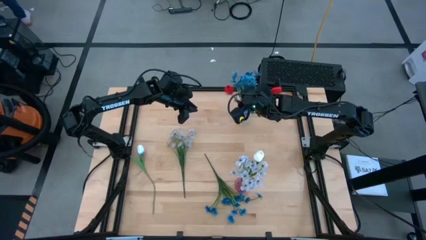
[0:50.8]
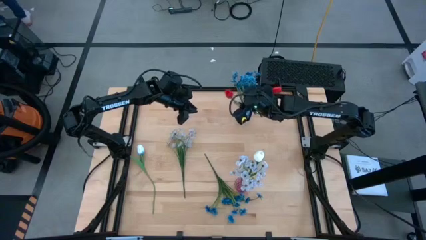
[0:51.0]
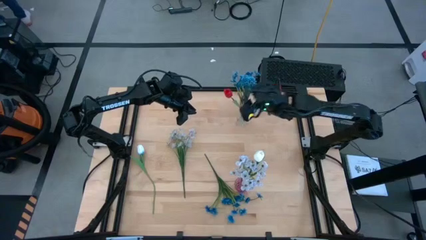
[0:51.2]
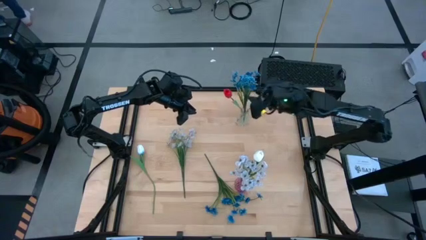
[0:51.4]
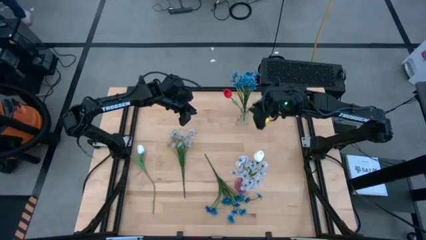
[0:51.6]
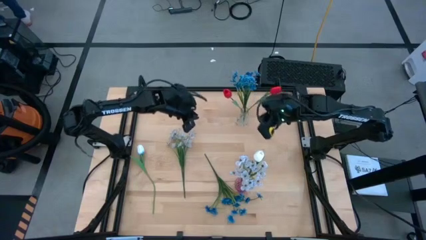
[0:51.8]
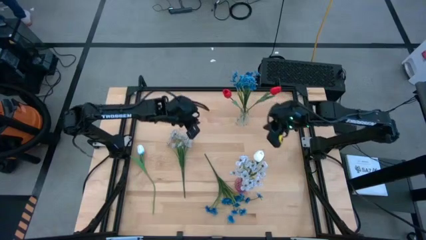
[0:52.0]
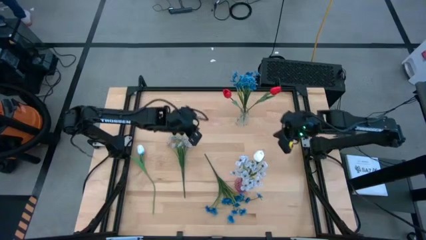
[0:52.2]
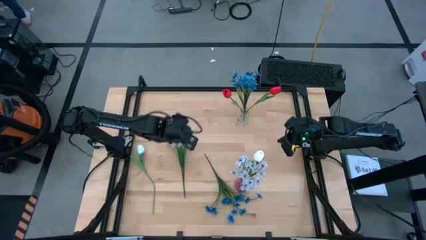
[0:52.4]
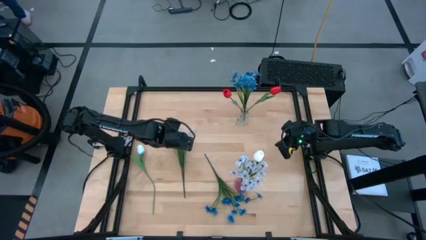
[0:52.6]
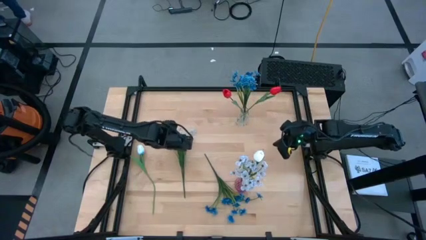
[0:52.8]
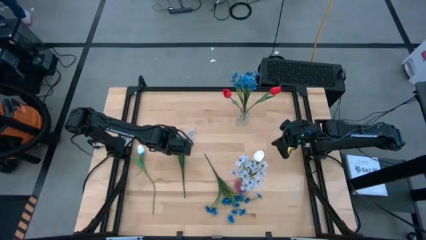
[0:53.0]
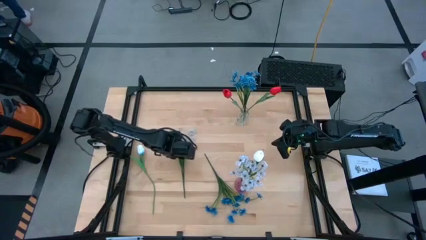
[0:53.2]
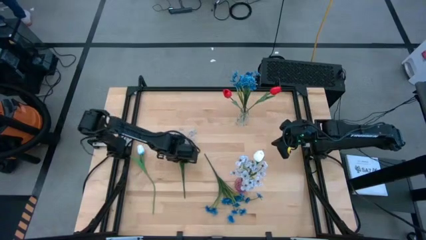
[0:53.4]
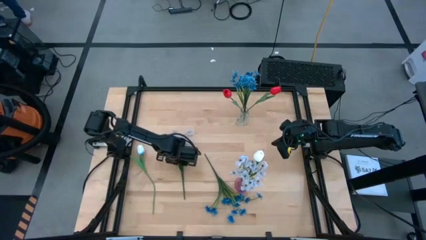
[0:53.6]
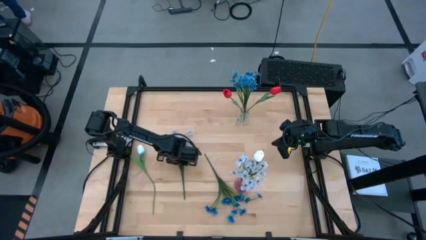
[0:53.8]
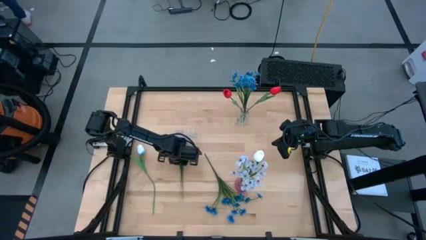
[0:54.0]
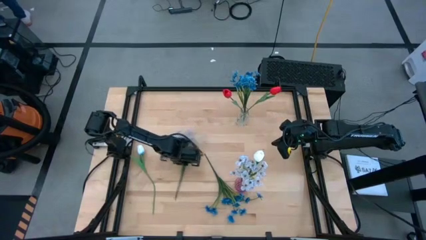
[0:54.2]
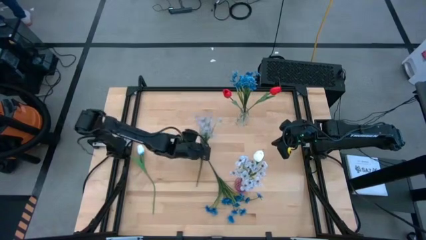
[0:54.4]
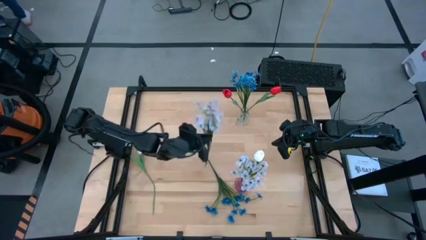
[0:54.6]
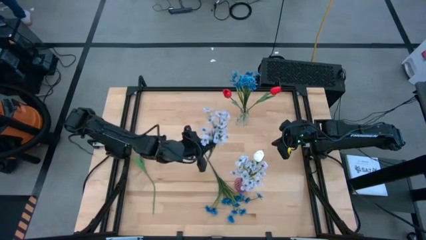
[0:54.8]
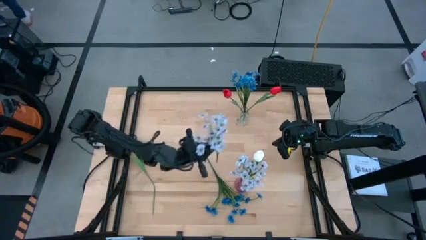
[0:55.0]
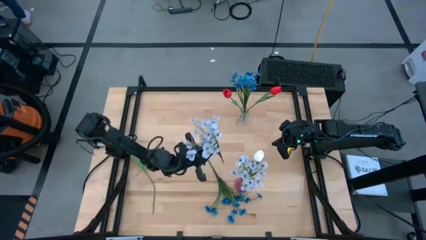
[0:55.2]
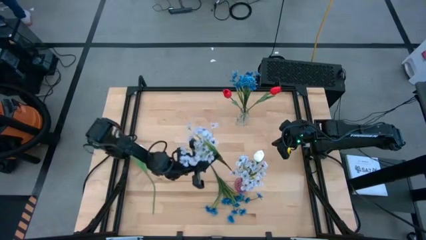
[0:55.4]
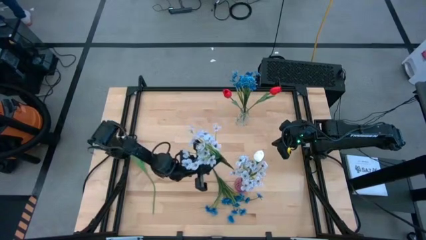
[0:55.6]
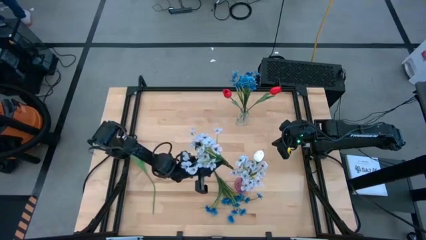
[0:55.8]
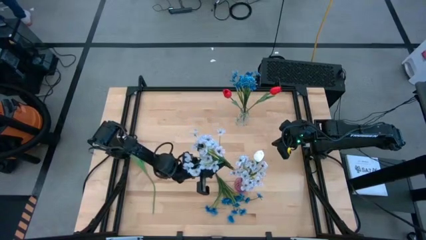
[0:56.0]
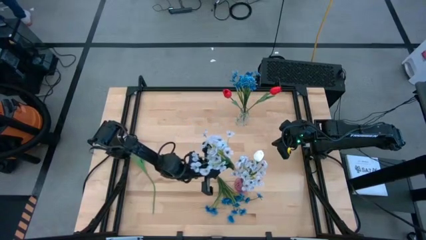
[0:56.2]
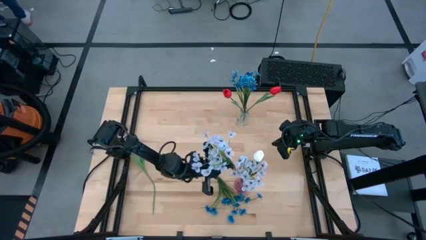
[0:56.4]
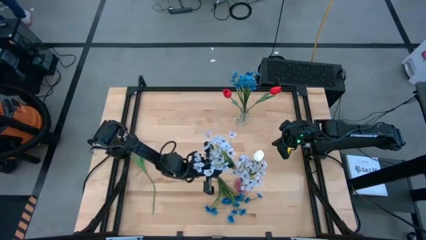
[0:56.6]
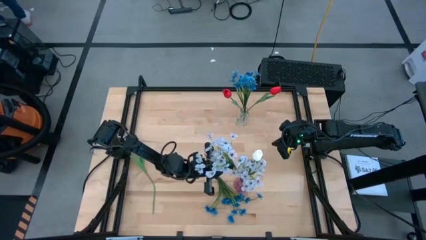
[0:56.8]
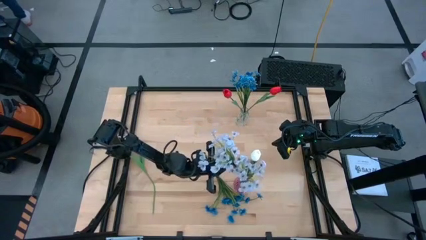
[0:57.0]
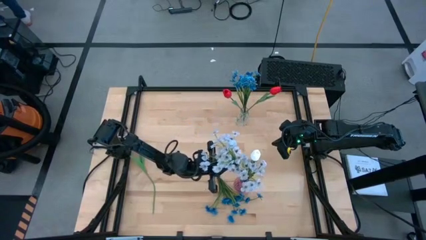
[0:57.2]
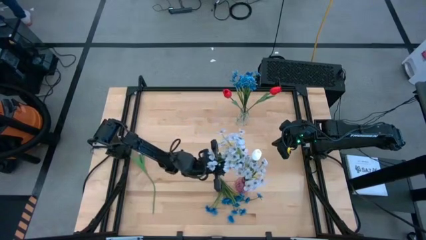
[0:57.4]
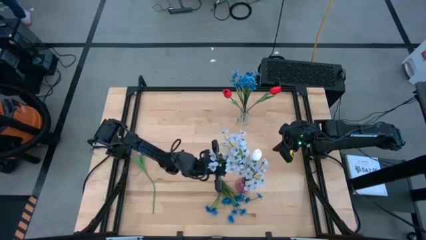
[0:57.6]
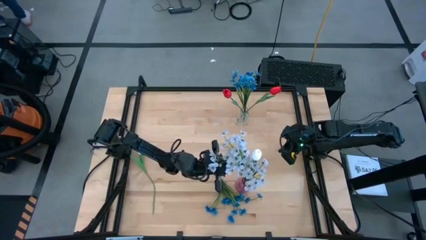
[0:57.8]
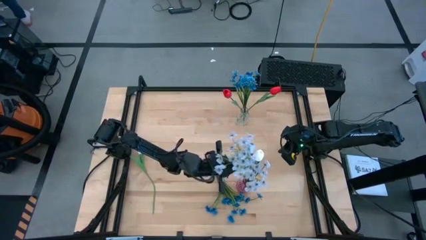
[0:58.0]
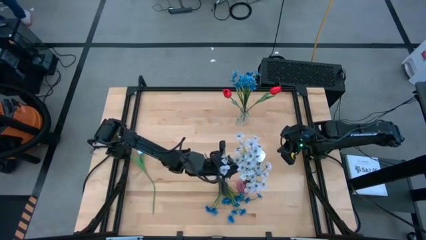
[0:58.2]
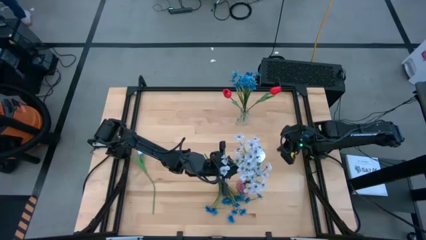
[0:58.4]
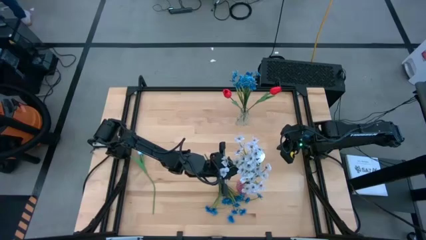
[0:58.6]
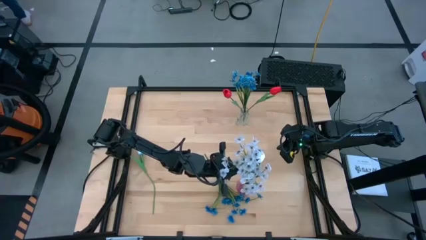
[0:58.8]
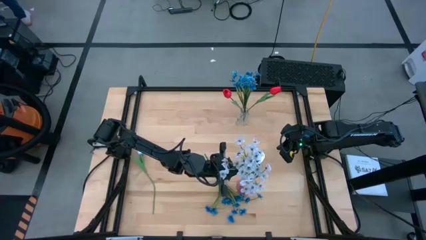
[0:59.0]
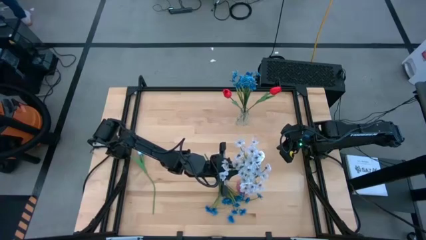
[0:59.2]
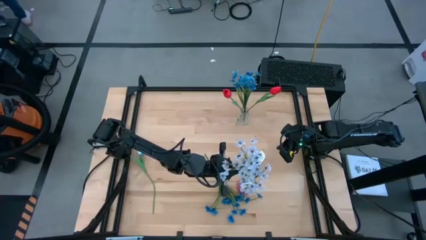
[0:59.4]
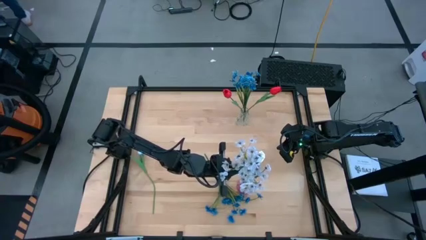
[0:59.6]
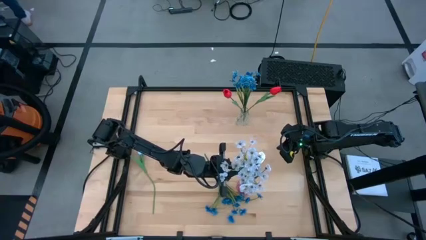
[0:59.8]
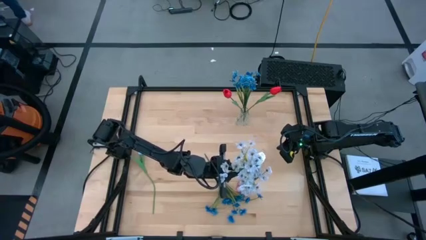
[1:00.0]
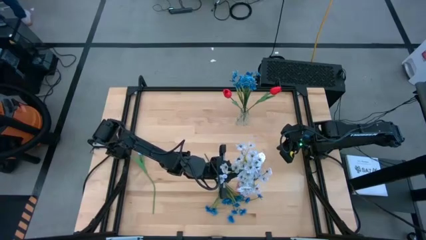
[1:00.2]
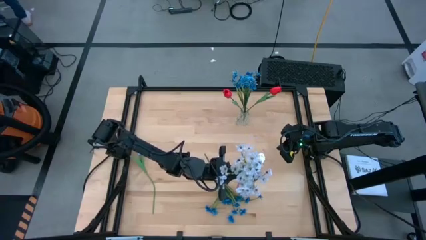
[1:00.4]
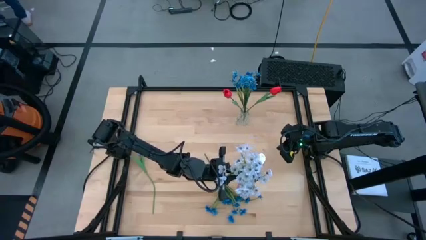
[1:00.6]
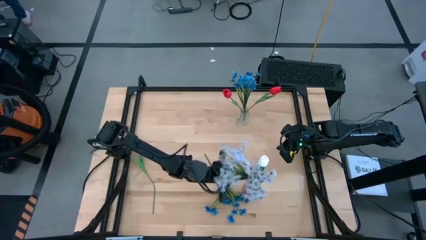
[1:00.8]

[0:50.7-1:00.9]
Task: Sort flowers into vase by color
Put the white flowers into the violet transparent vase
